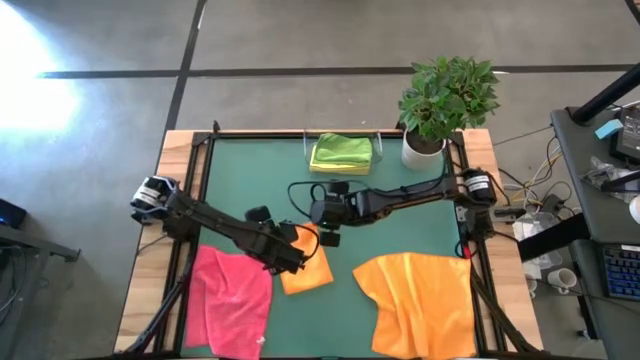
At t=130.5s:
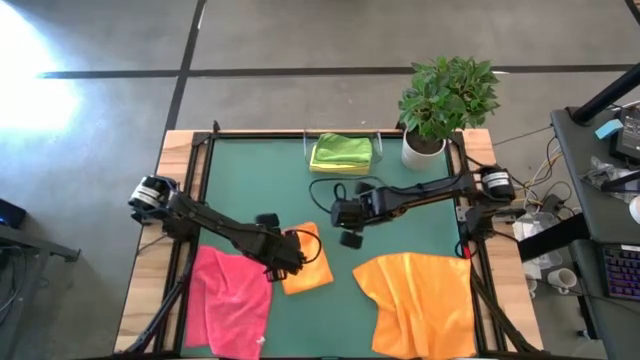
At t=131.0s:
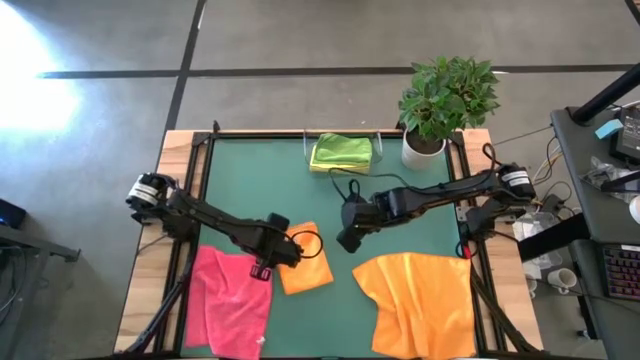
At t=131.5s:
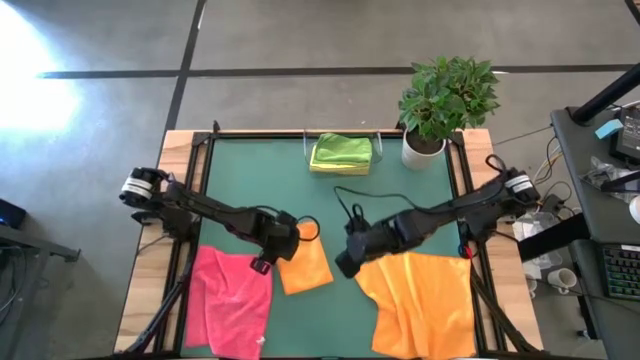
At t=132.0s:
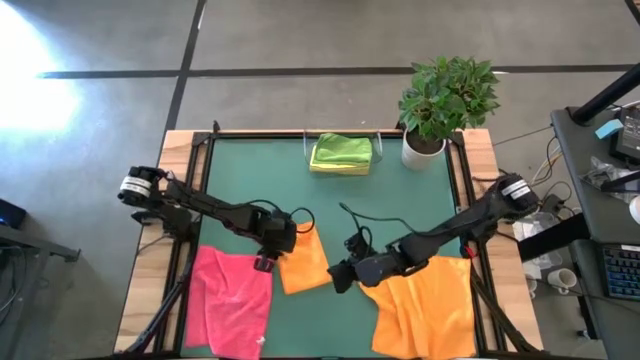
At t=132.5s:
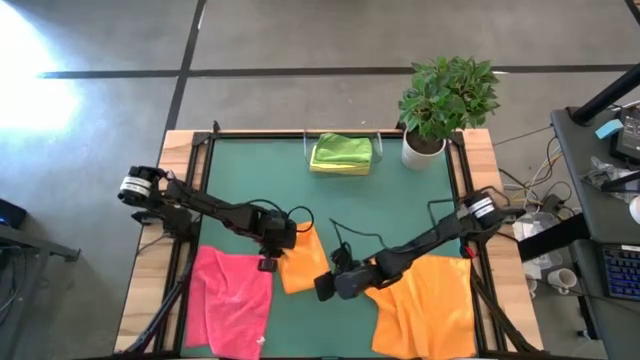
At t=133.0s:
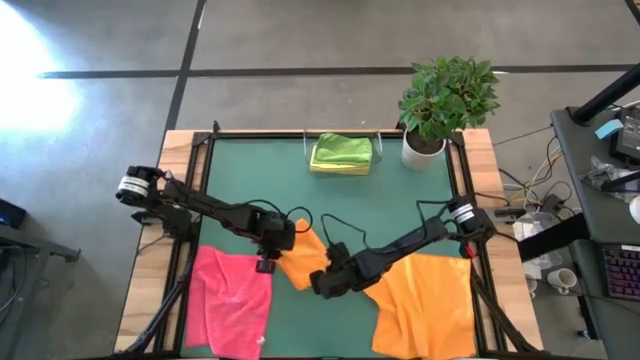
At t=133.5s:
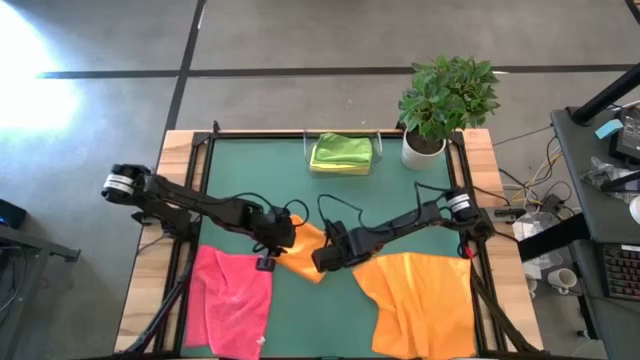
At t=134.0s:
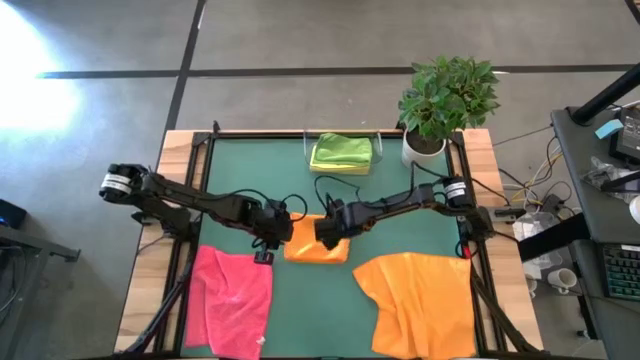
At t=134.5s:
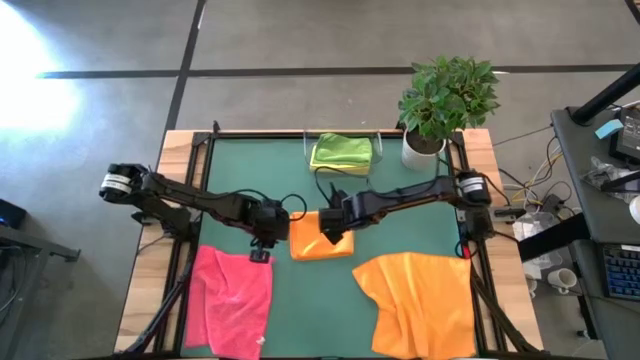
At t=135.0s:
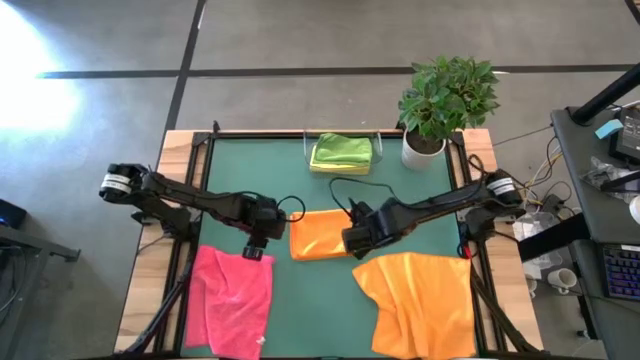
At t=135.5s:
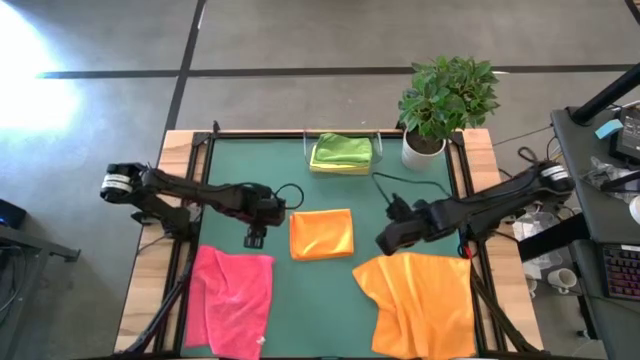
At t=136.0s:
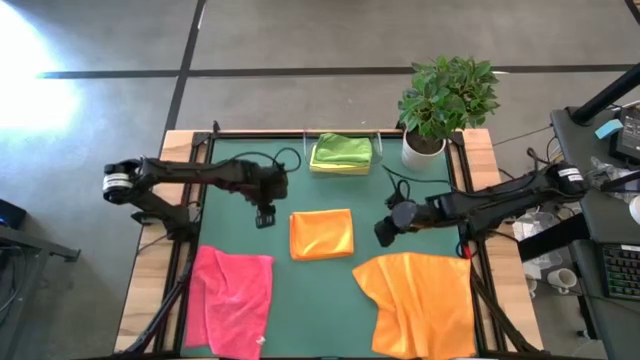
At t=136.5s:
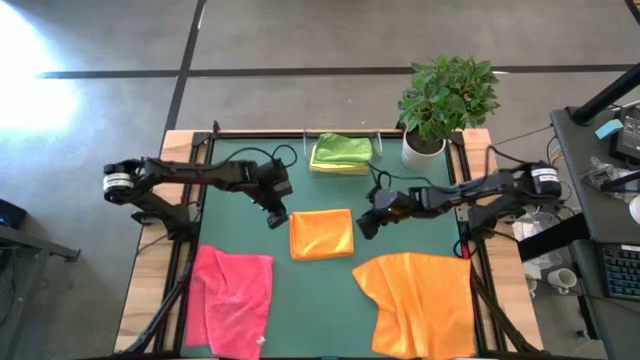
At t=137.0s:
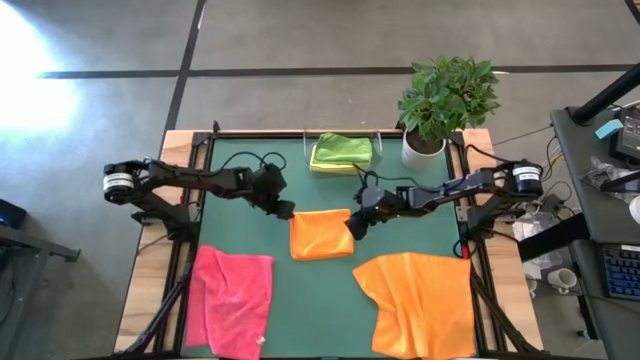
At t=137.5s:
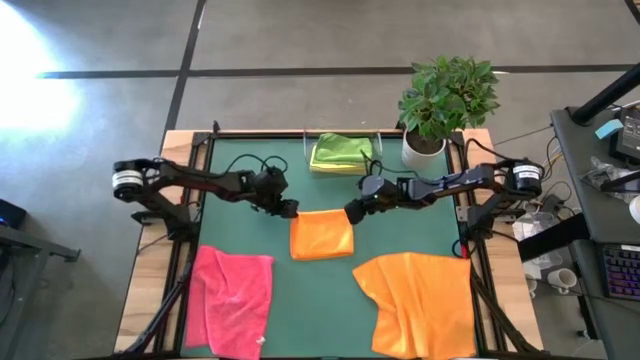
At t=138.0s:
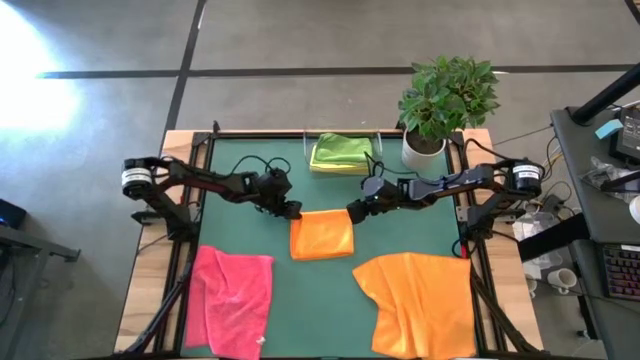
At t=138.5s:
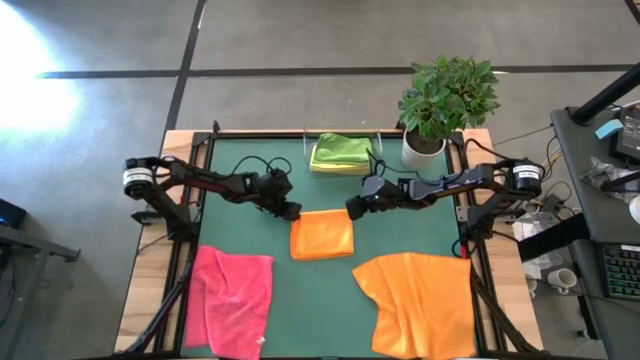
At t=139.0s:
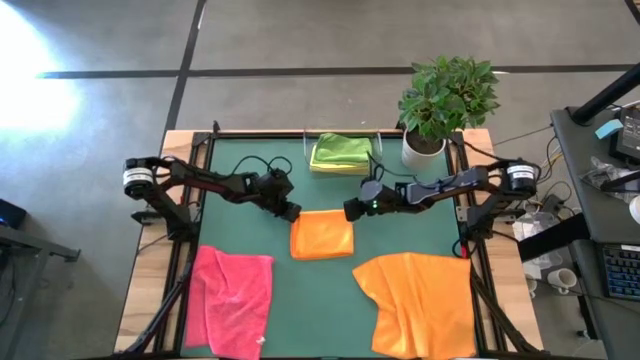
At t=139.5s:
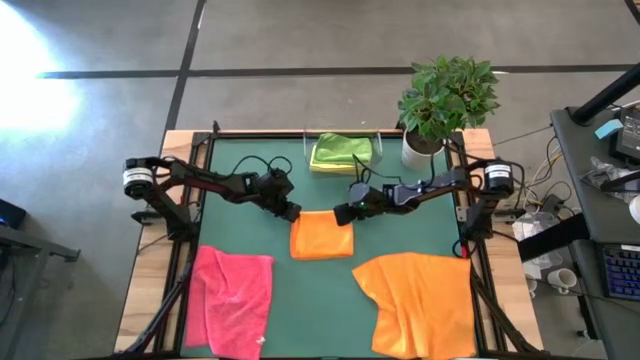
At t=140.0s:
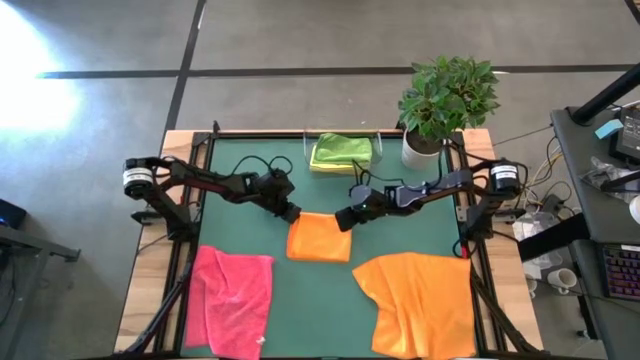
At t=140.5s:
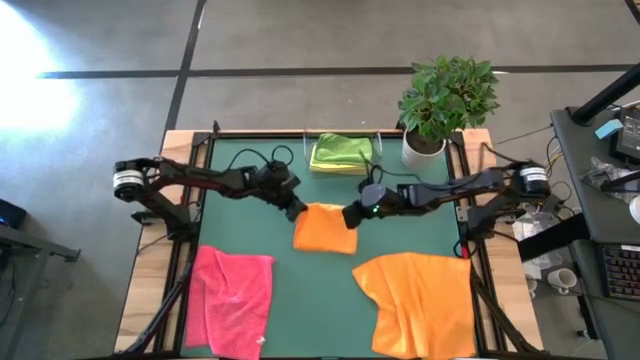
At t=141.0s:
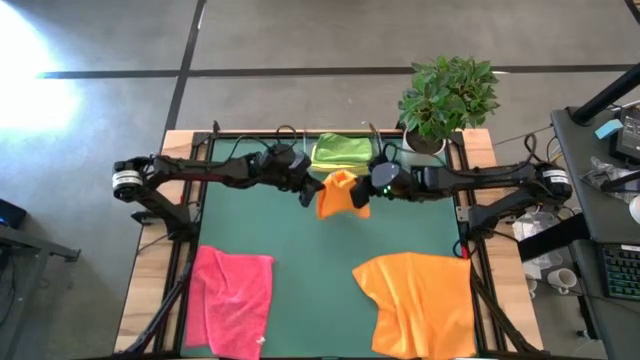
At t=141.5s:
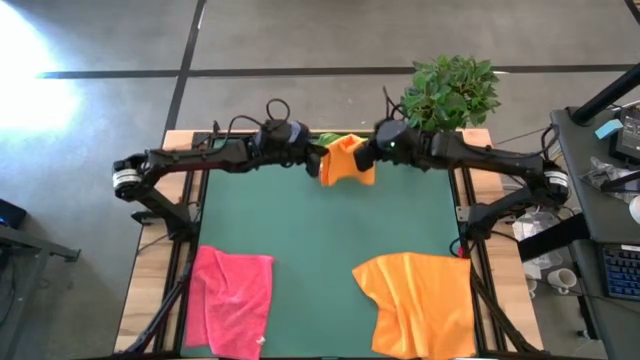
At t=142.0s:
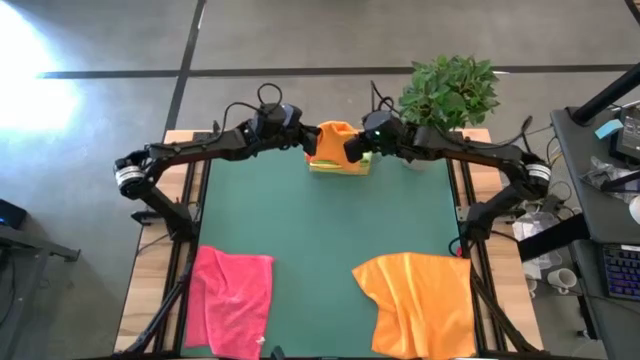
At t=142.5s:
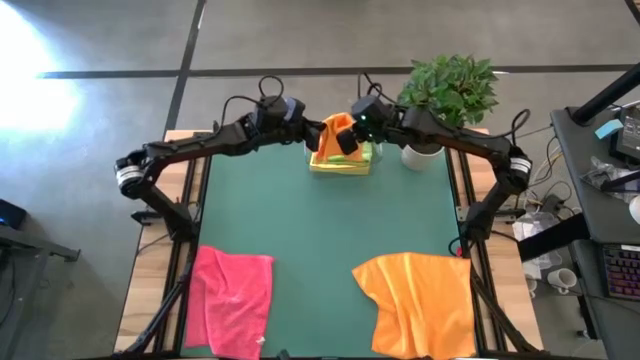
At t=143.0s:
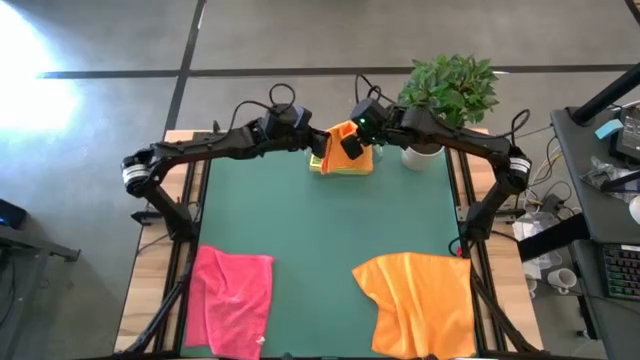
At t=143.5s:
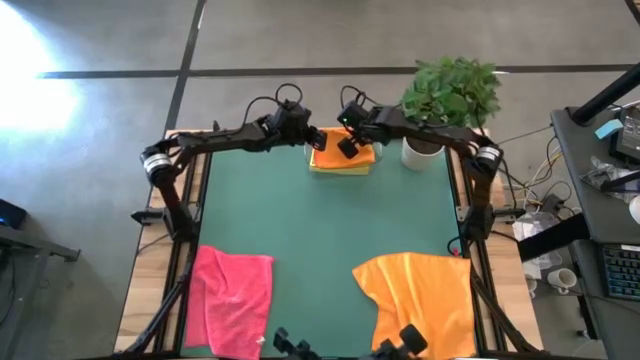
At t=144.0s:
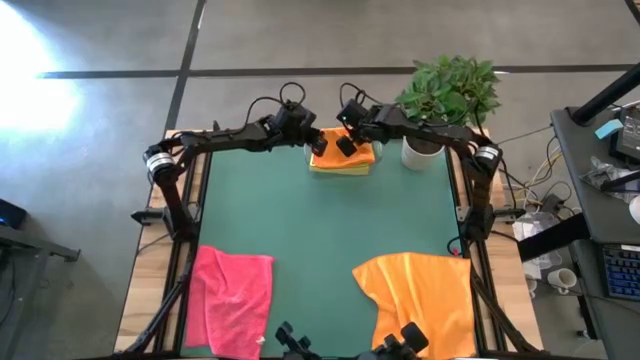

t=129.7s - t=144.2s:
Task: Fold microfiber towels
Put the folded orange towel into the transparent bin

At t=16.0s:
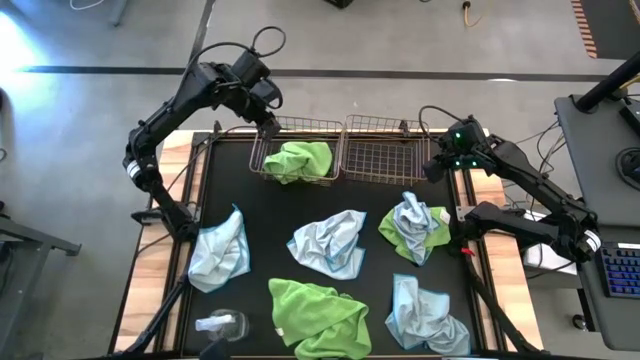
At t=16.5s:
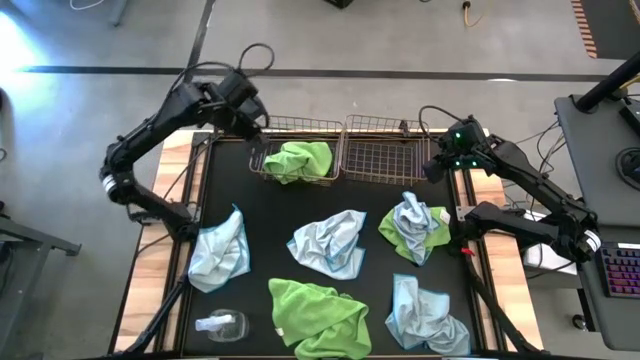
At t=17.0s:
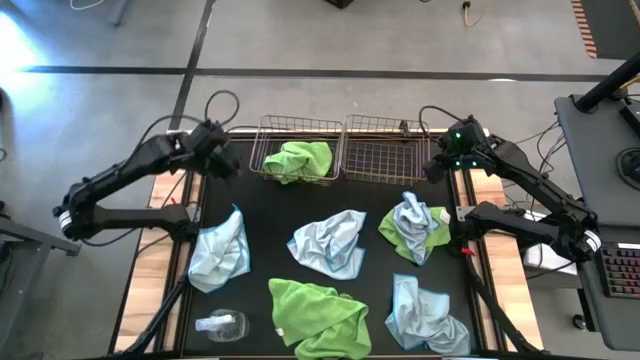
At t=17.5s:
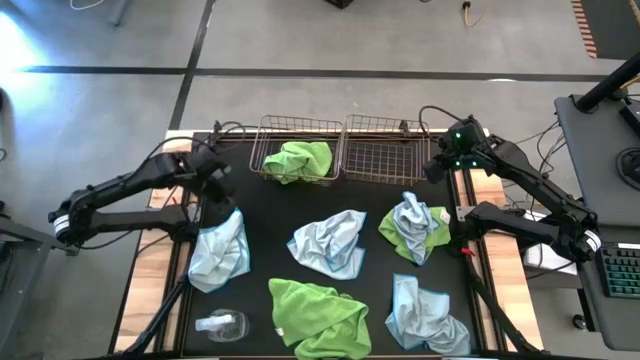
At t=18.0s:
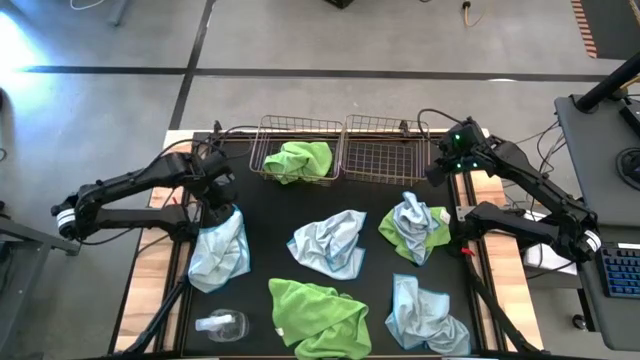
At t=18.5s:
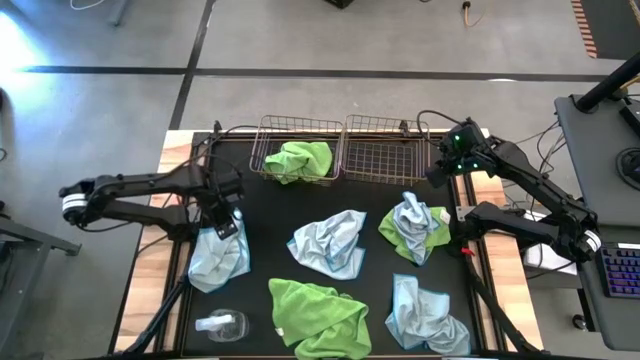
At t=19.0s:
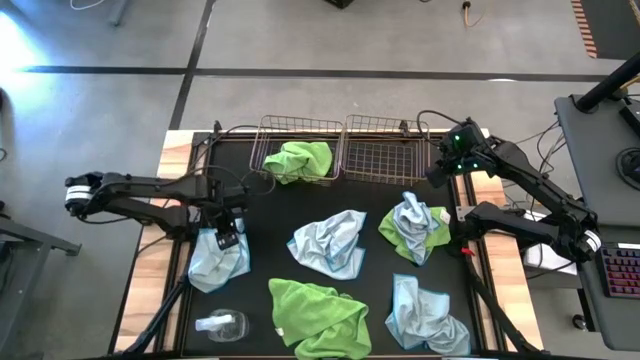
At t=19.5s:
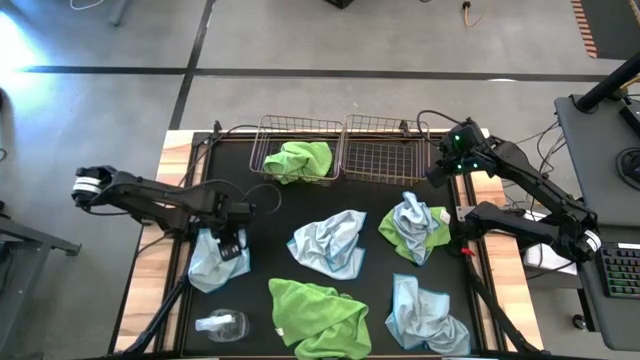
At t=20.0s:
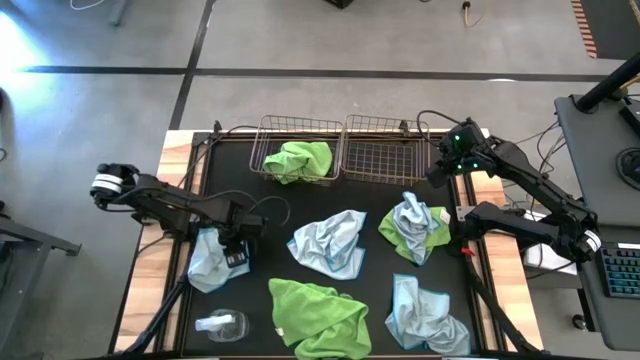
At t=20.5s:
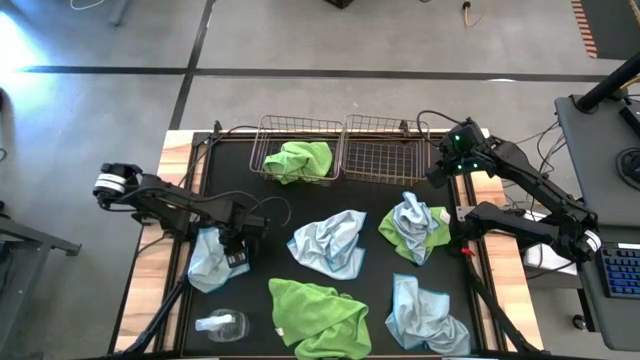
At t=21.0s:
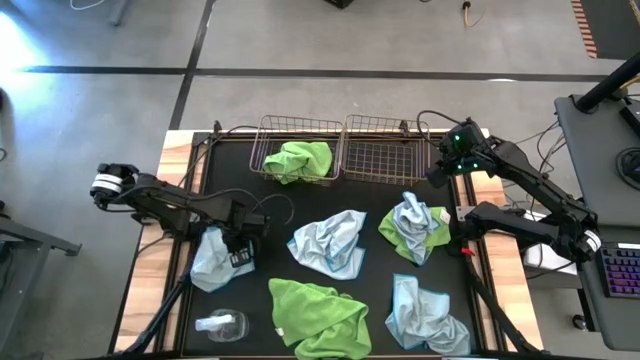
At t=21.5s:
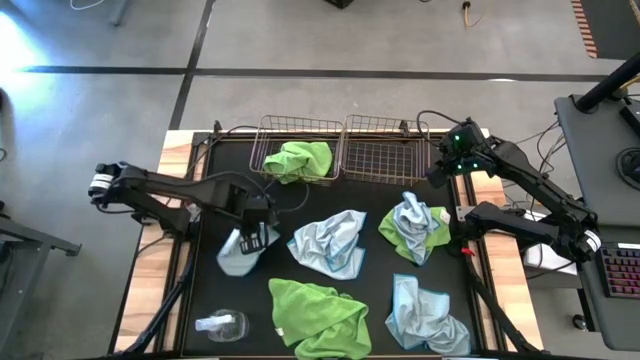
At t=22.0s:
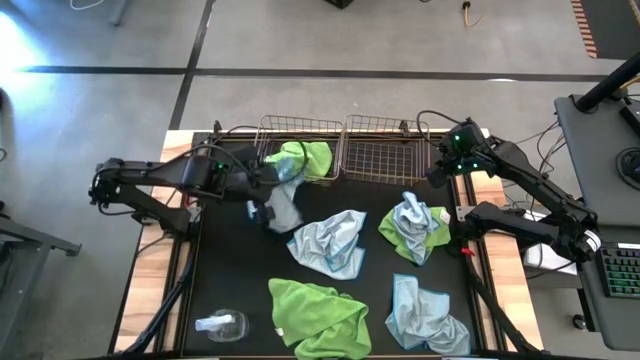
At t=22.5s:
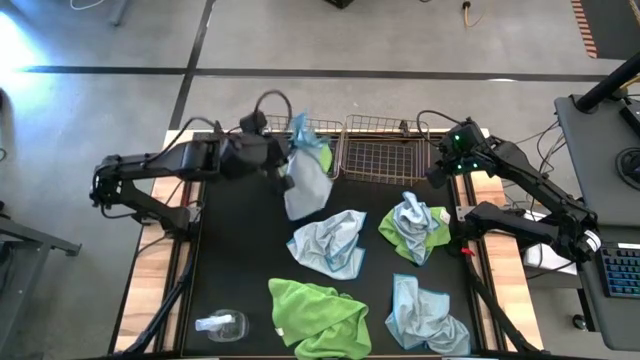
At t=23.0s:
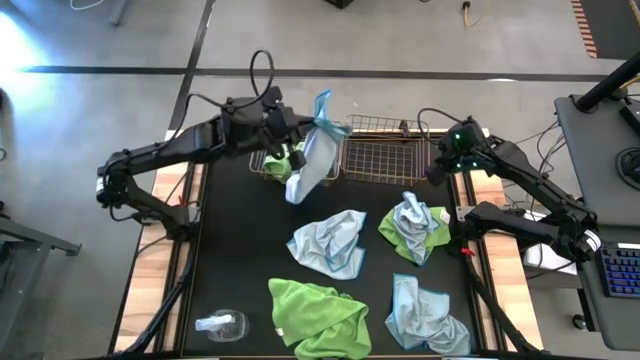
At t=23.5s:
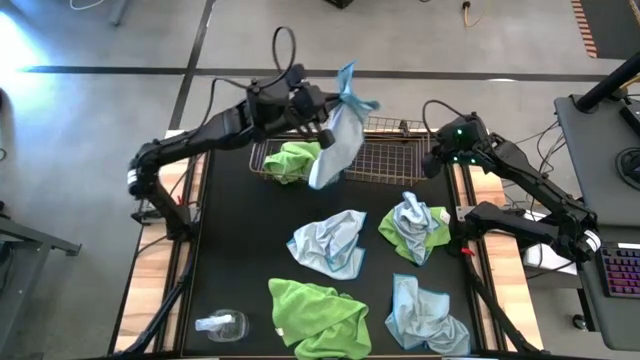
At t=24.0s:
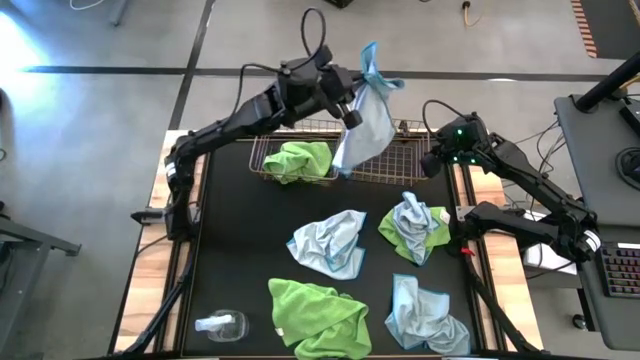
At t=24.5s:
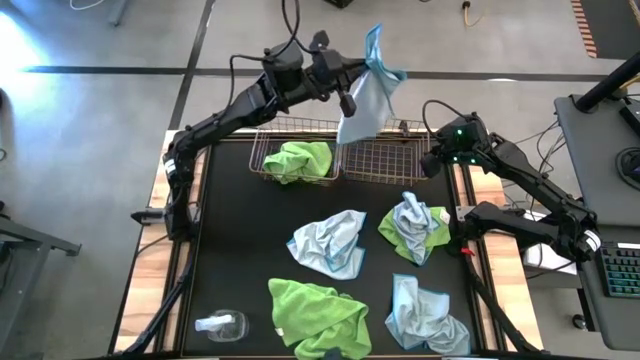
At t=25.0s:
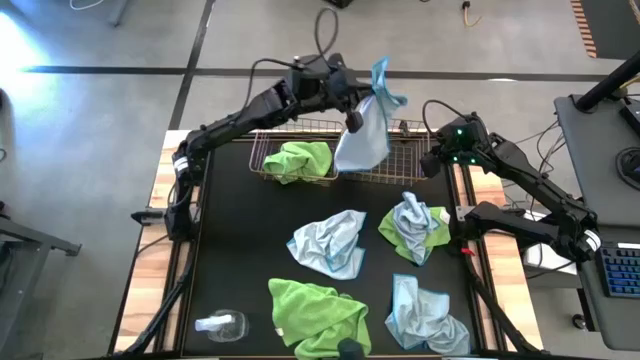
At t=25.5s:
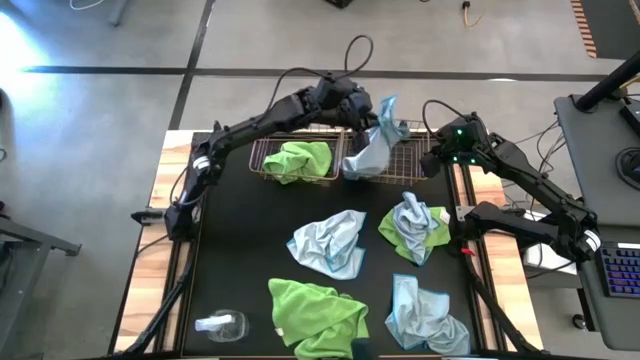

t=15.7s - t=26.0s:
Task: Sort microfiber towel by color & place in baskets
Put the white microfiber cloth into the right wire basket
